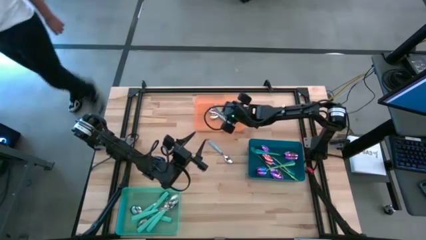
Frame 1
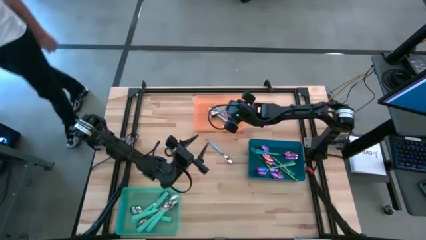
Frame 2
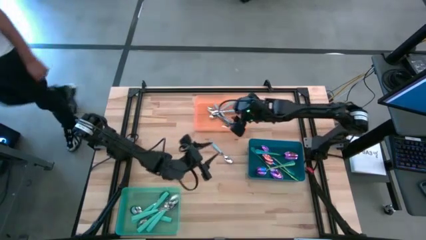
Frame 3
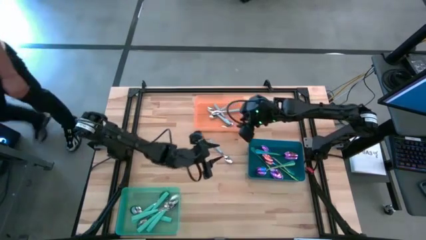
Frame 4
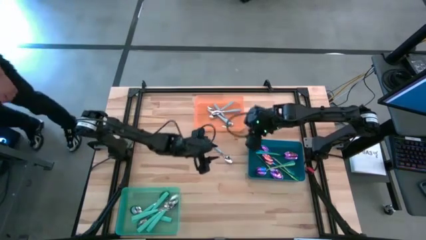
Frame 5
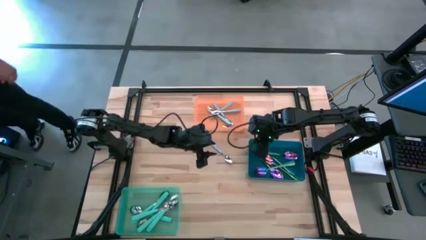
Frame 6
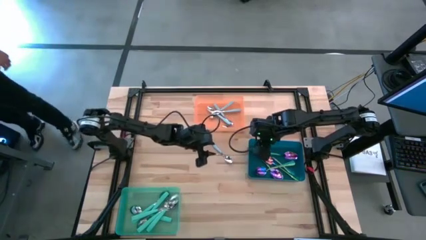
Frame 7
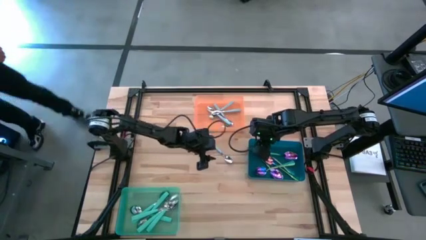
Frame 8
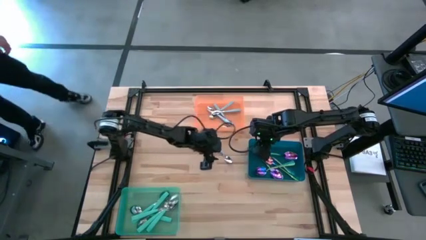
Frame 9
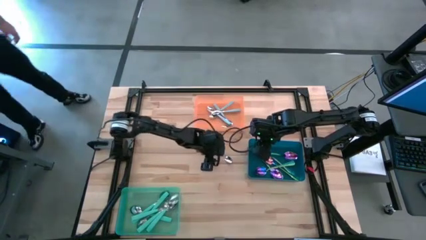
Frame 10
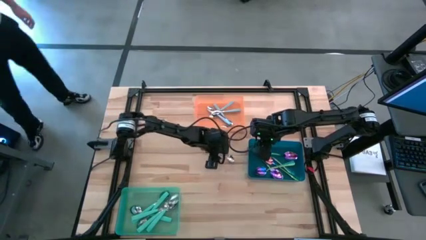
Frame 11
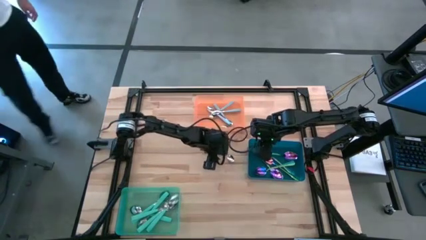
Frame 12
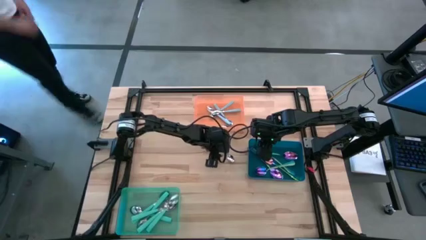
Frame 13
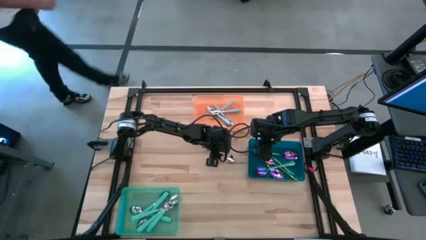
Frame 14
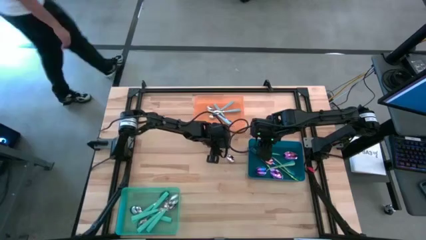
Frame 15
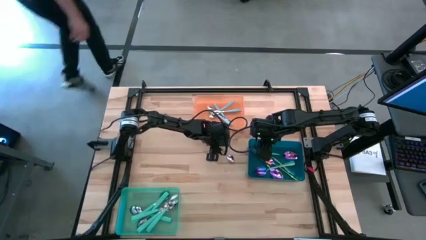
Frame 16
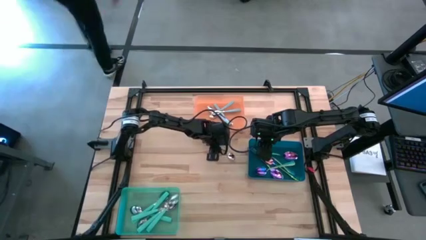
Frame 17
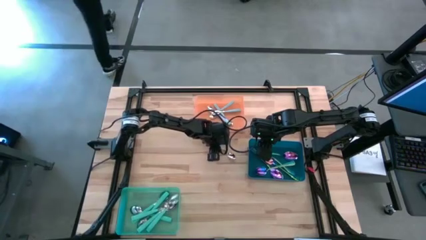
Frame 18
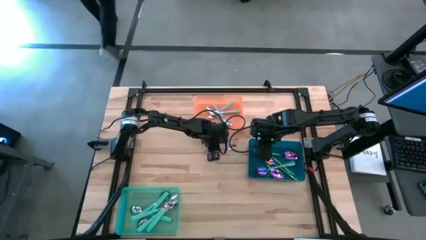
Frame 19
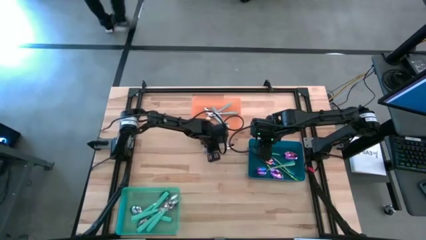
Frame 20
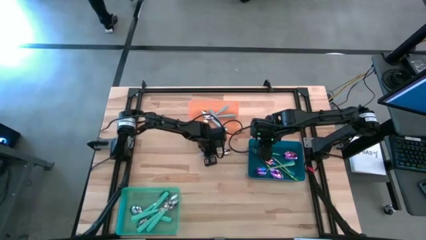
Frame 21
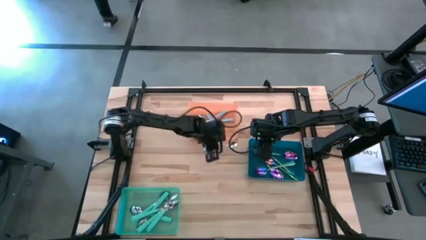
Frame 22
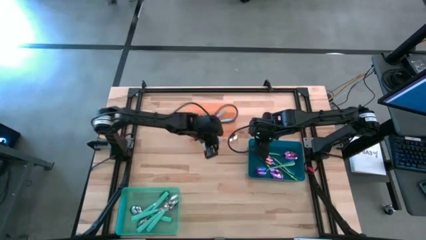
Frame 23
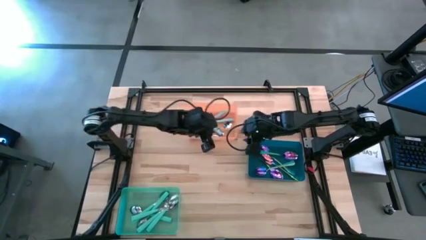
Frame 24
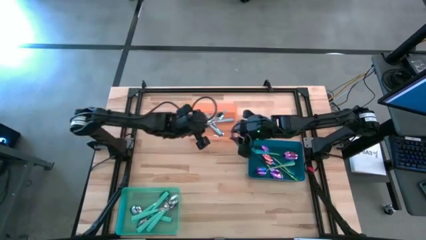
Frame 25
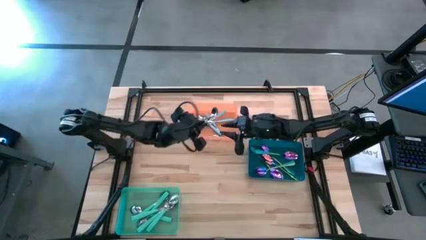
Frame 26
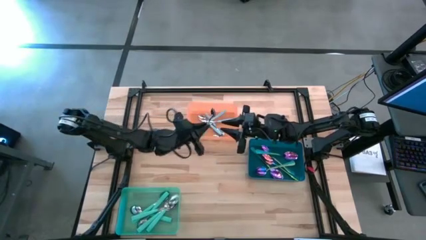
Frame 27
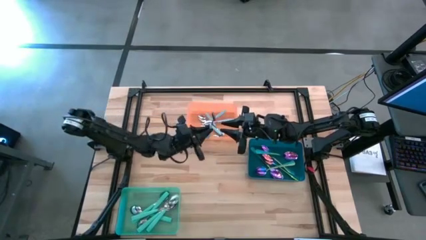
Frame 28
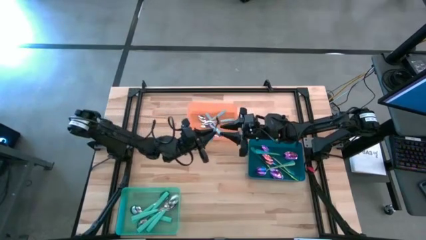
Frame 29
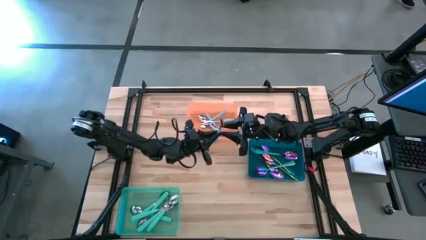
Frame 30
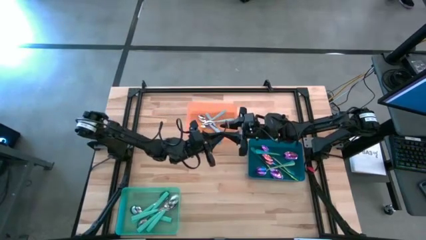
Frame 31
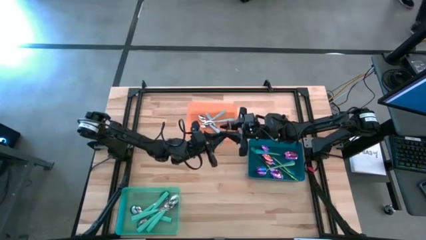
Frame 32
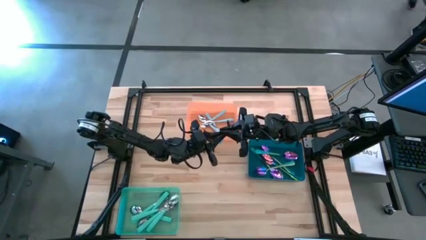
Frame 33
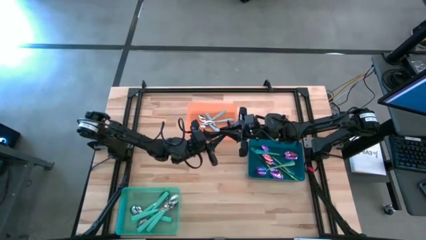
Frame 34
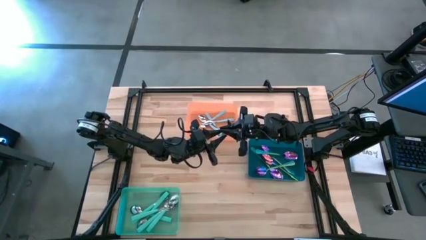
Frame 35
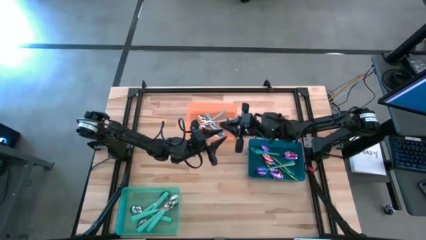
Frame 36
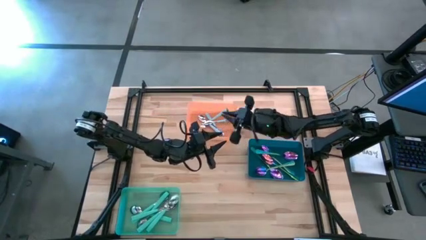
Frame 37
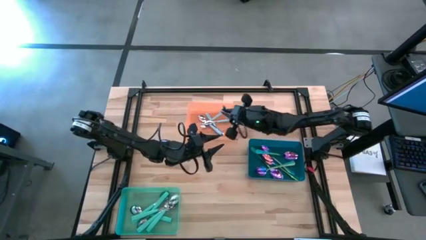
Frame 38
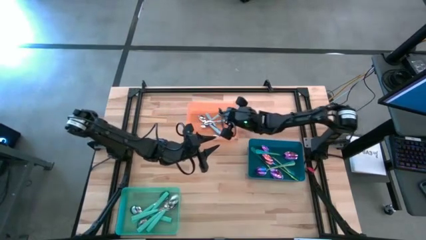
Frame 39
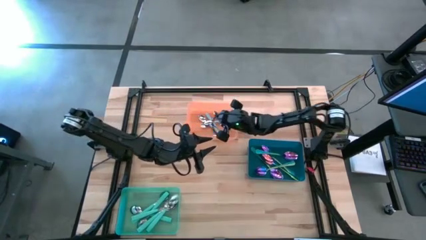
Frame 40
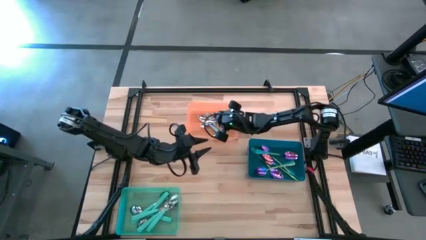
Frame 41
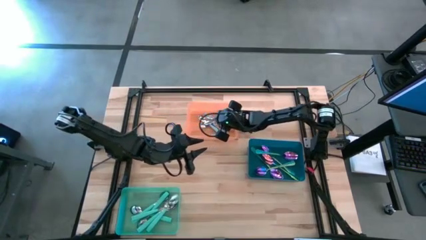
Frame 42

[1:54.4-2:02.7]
Task: Sort silverware by color (type)
Put the blue spoon into the orange bin

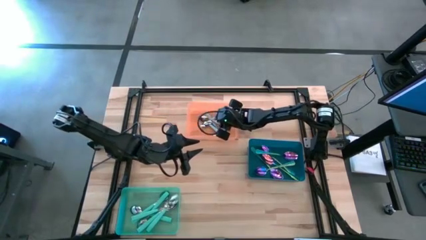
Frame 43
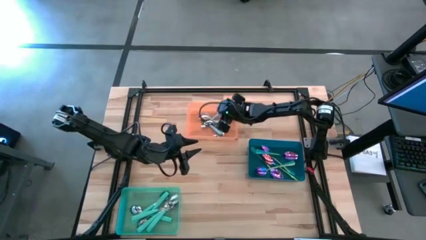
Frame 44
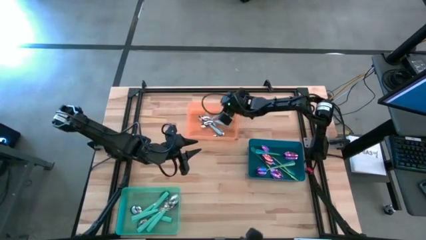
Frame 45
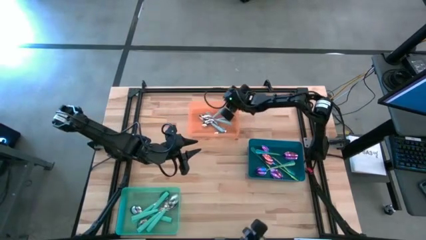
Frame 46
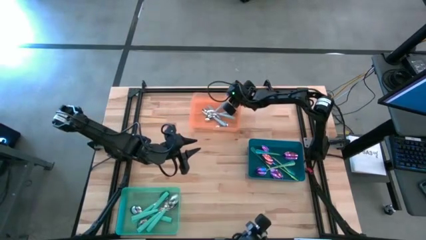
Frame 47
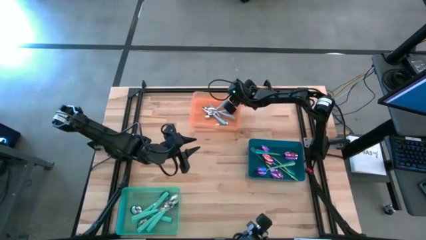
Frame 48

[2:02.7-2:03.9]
Adjust the orange bin

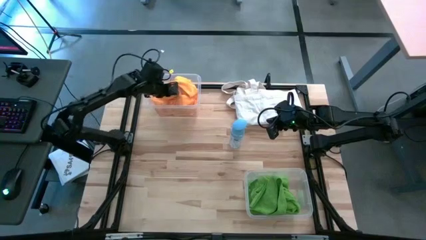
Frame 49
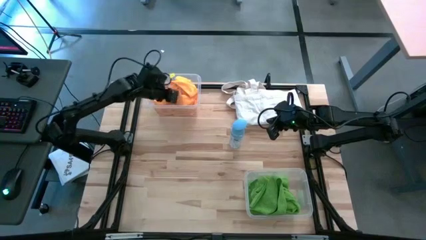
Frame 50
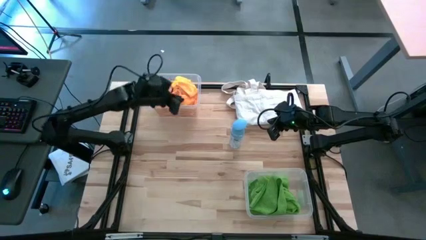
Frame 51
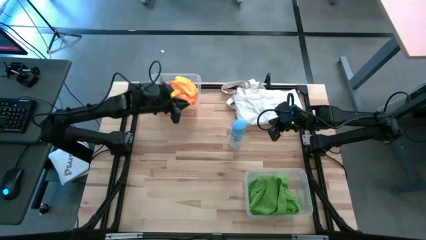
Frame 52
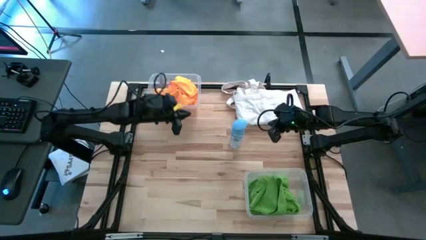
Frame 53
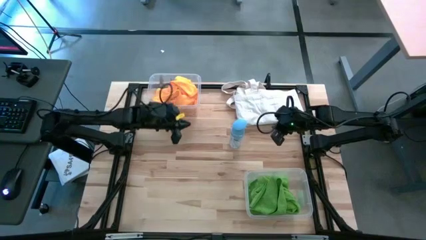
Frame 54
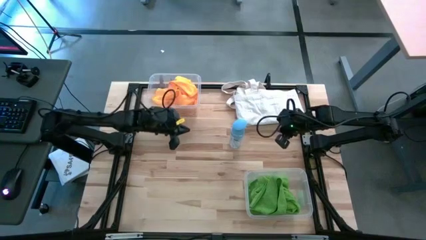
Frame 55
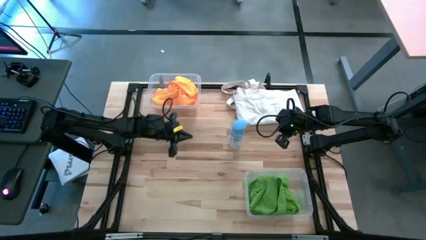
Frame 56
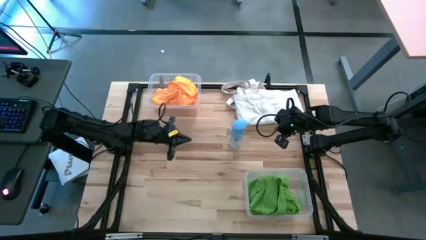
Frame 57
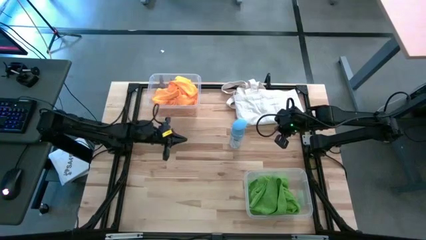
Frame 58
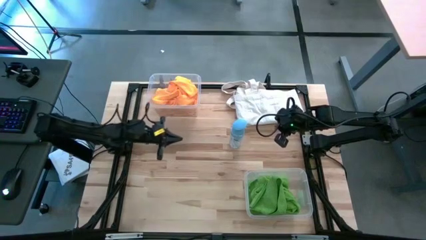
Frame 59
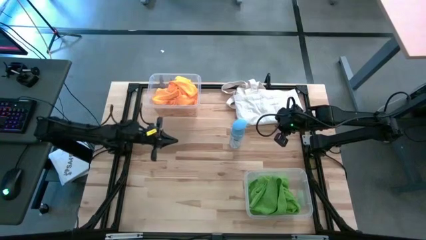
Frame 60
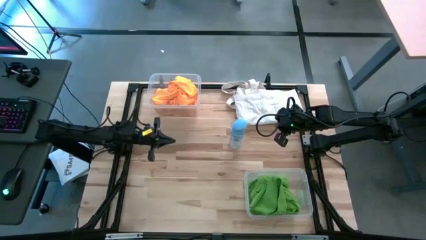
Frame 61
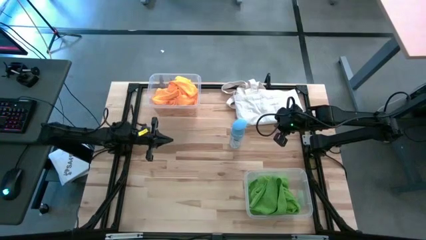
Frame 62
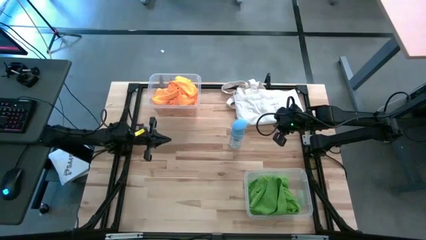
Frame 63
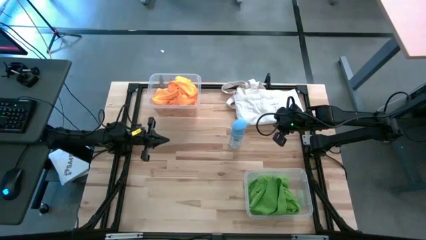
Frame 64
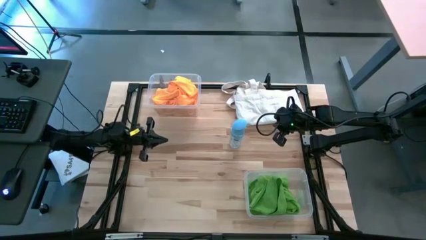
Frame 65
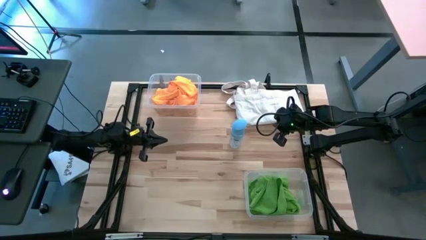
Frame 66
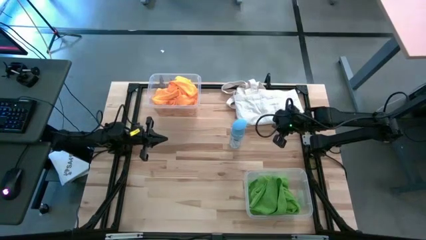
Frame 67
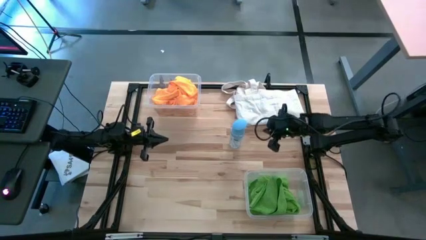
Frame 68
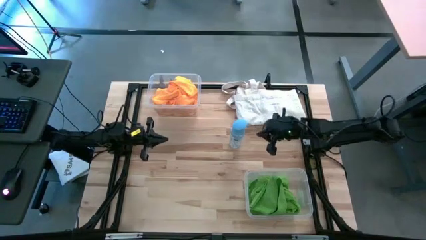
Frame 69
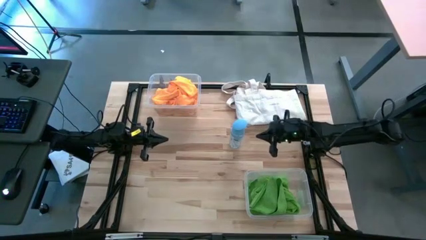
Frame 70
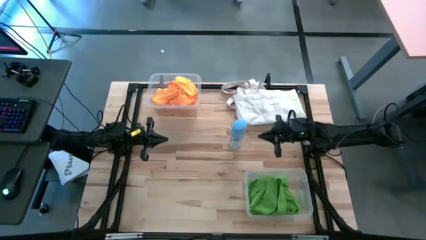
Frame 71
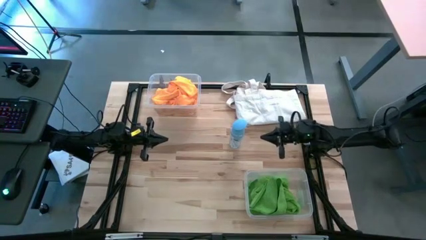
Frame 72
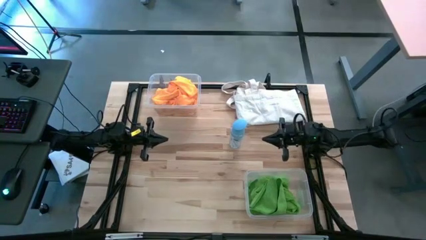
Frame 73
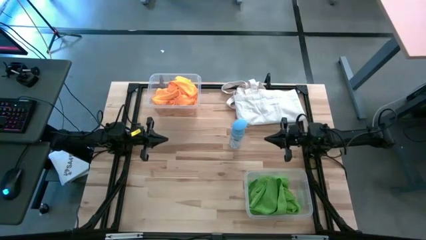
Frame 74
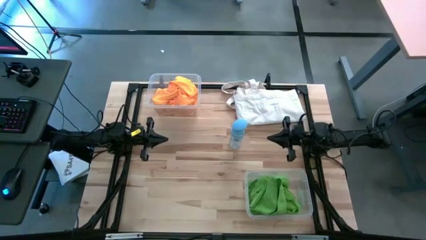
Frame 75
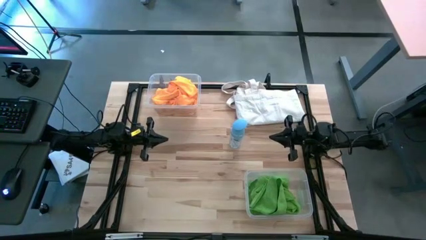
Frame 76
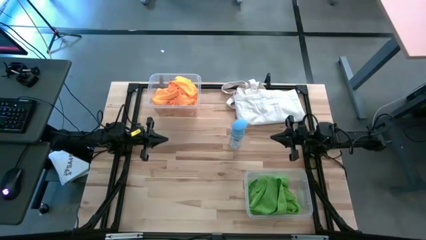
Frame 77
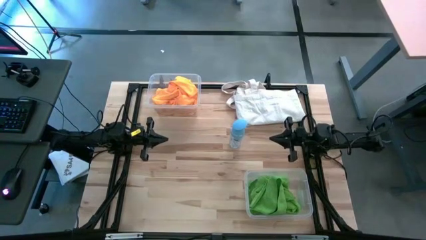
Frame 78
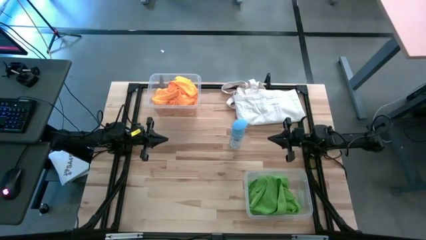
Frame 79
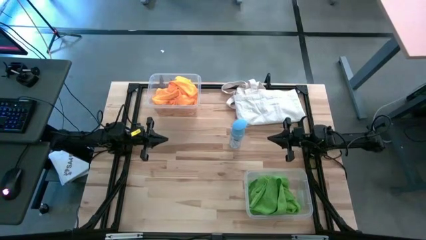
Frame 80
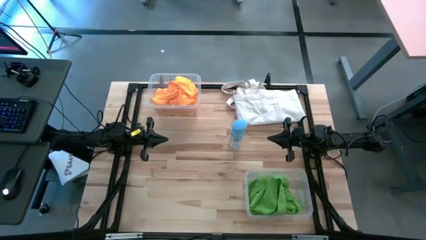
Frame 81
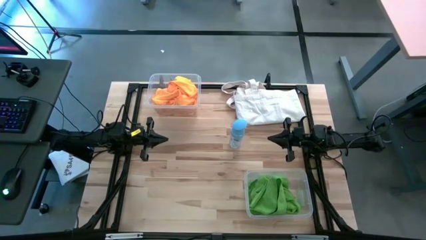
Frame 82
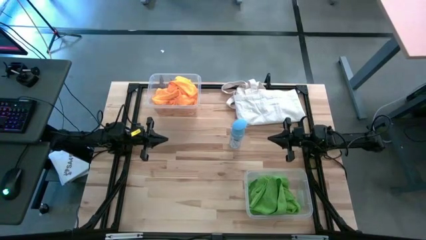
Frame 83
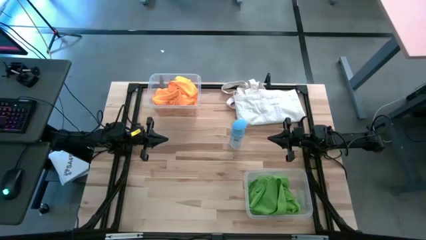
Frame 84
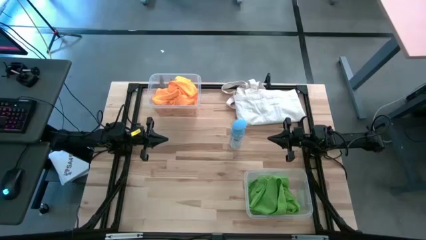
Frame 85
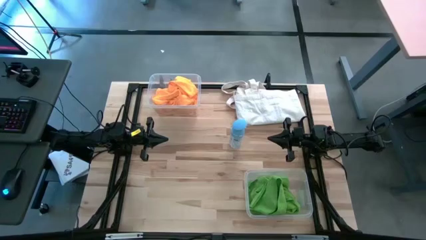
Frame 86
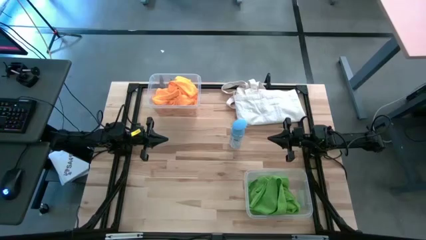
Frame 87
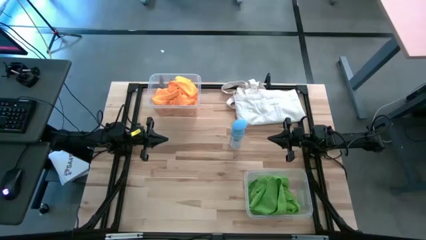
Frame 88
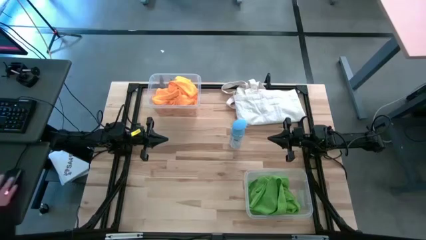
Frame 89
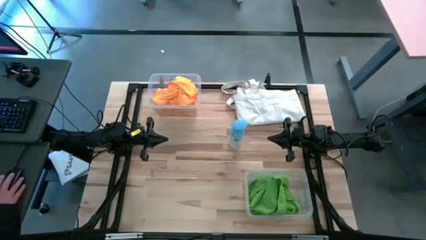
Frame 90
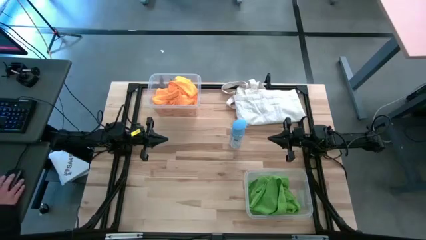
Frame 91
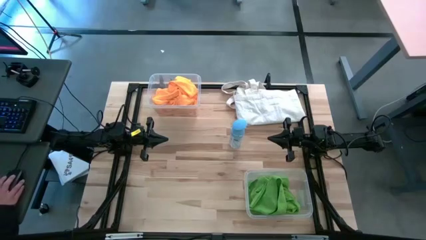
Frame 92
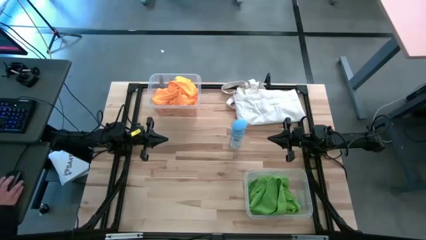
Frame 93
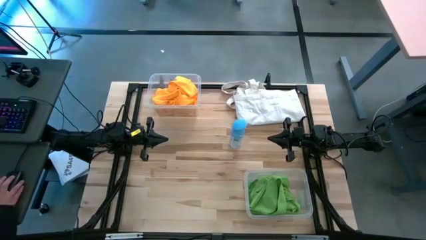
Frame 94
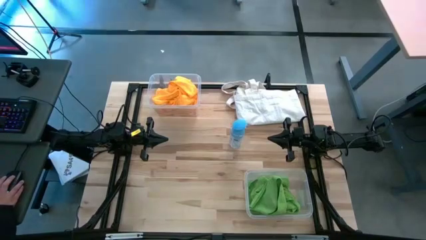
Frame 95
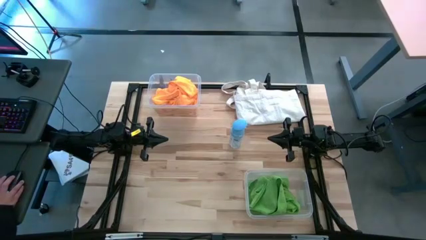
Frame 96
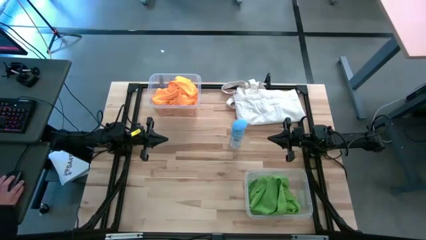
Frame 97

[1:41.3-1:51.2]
Task: Sort microfiber towel by color & place in baskets
Return to Home Position
